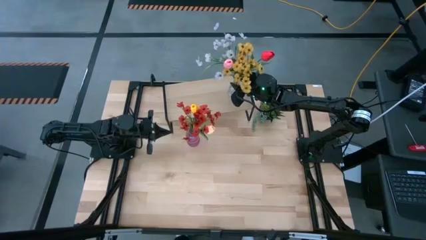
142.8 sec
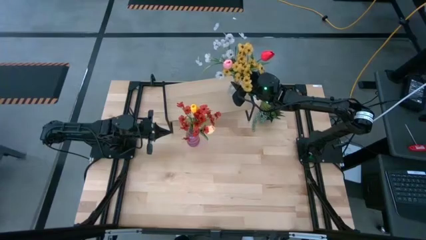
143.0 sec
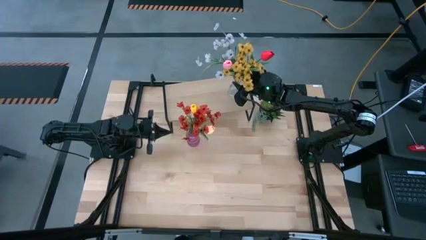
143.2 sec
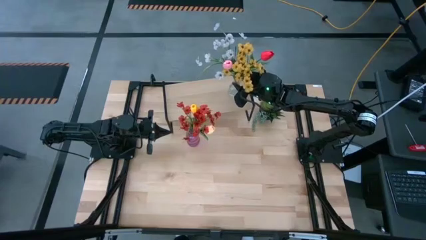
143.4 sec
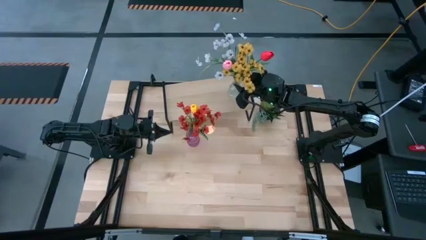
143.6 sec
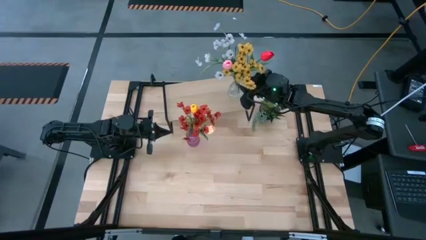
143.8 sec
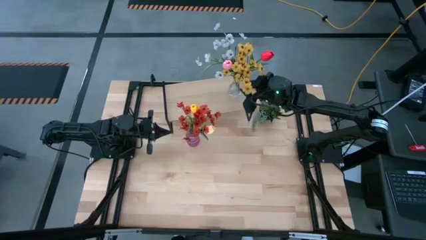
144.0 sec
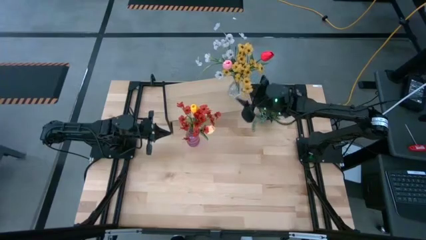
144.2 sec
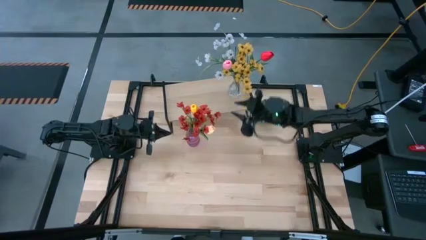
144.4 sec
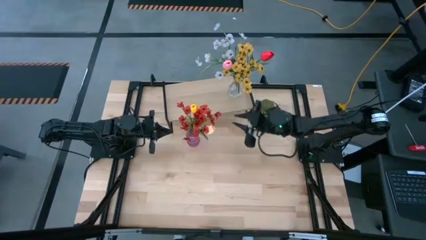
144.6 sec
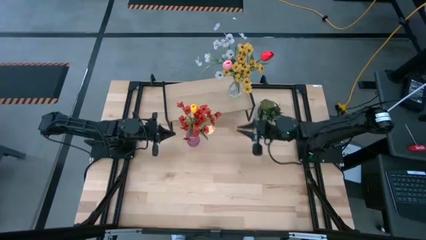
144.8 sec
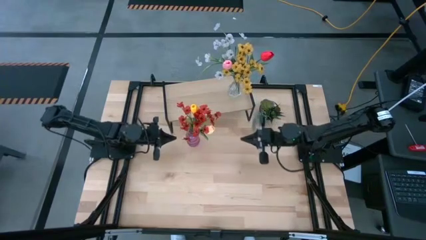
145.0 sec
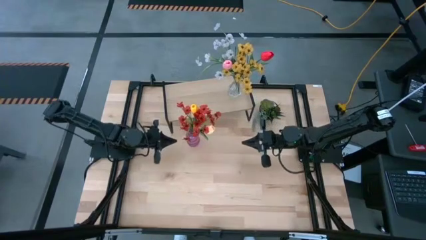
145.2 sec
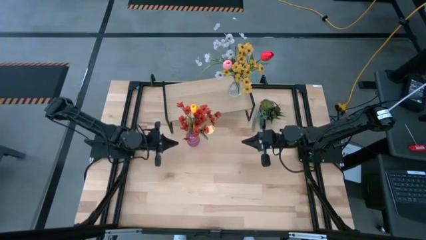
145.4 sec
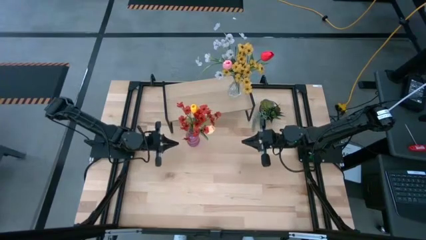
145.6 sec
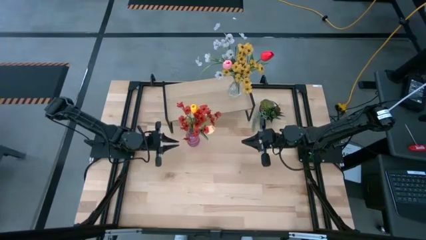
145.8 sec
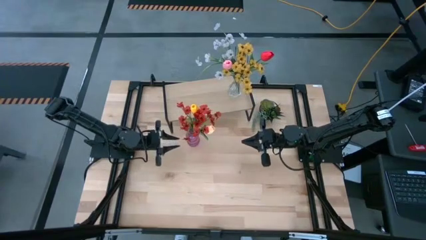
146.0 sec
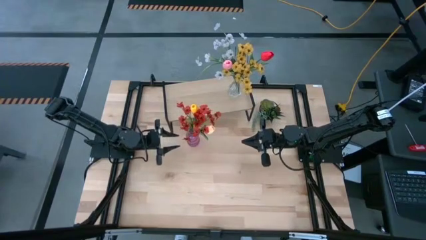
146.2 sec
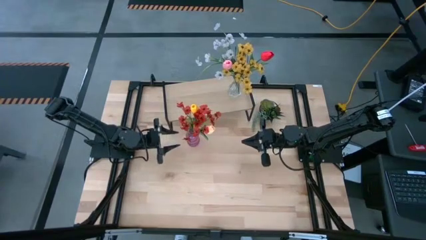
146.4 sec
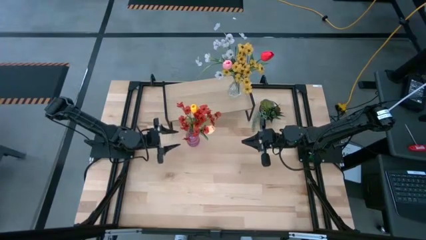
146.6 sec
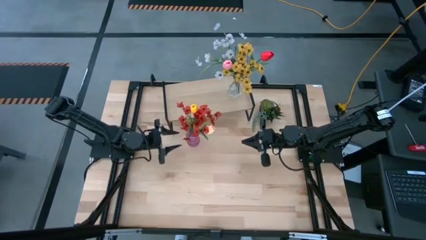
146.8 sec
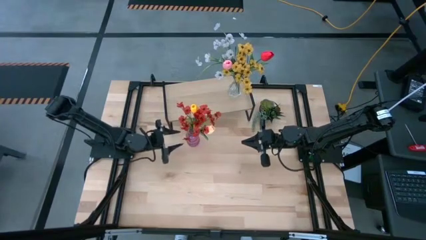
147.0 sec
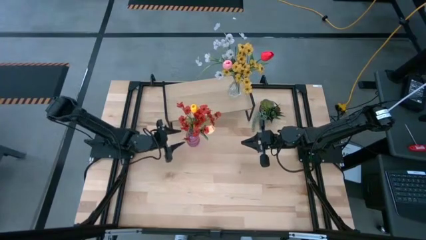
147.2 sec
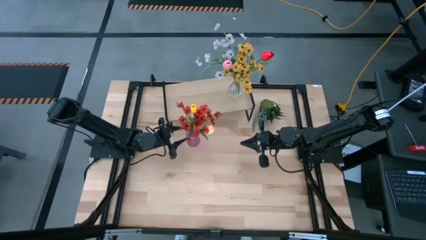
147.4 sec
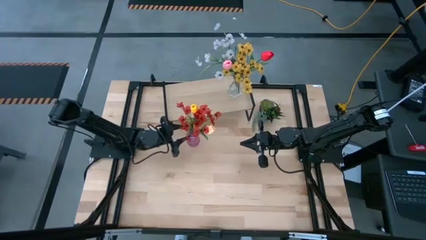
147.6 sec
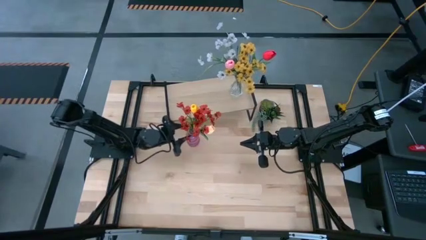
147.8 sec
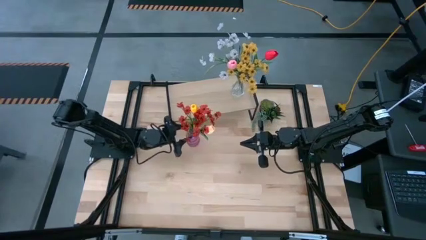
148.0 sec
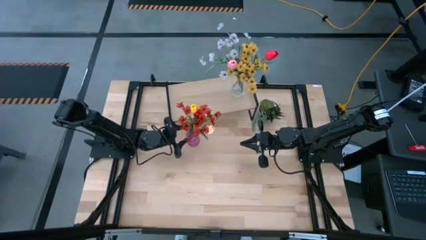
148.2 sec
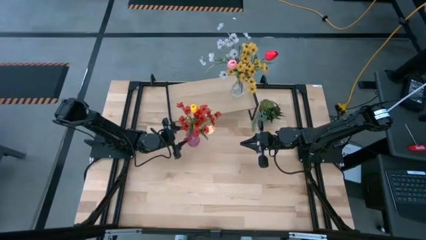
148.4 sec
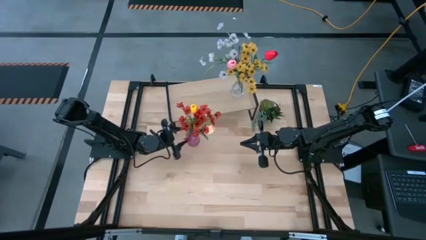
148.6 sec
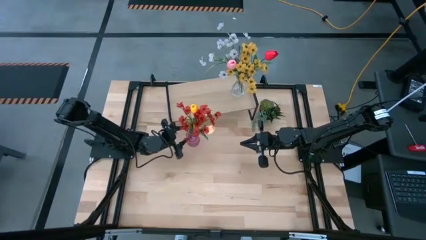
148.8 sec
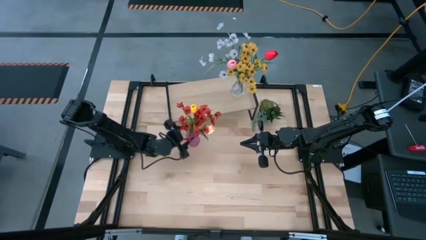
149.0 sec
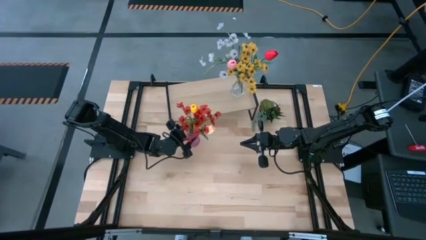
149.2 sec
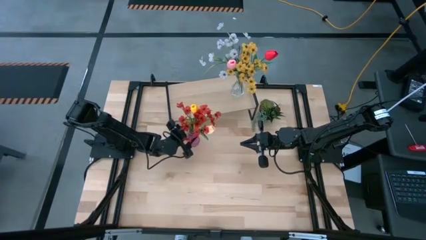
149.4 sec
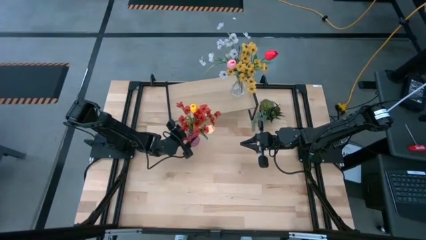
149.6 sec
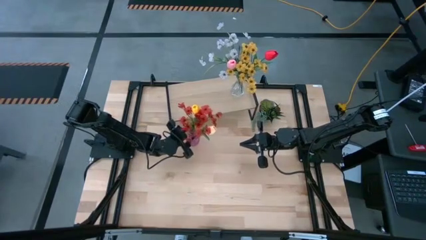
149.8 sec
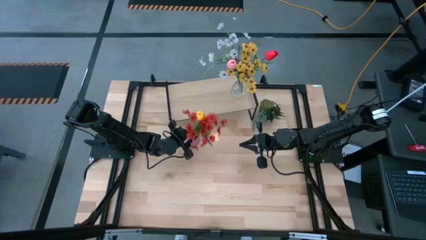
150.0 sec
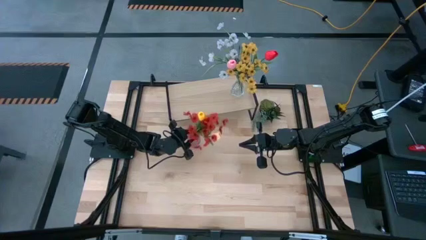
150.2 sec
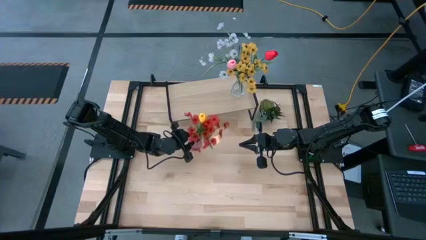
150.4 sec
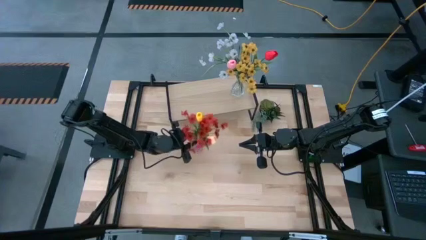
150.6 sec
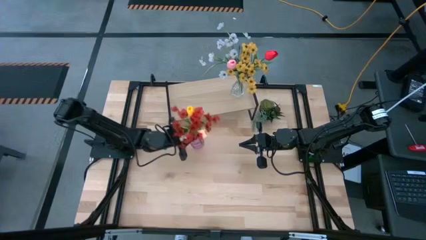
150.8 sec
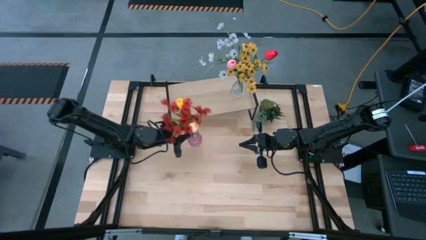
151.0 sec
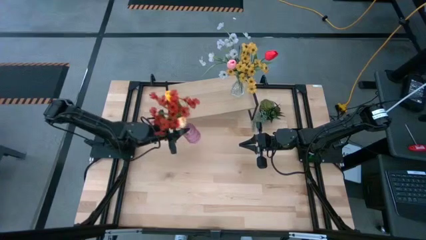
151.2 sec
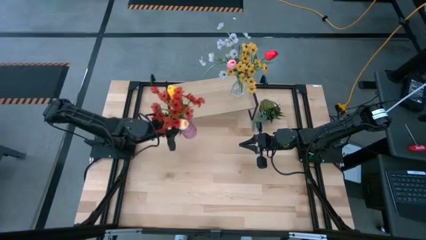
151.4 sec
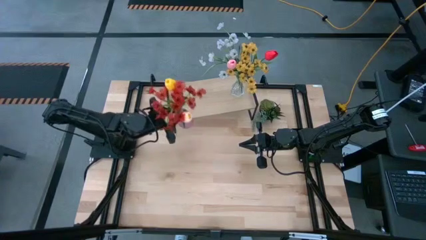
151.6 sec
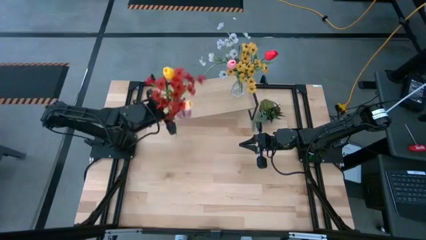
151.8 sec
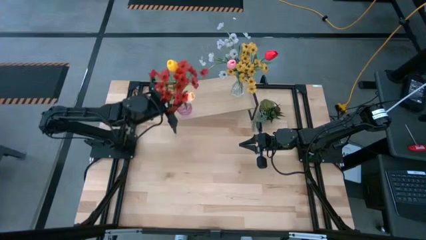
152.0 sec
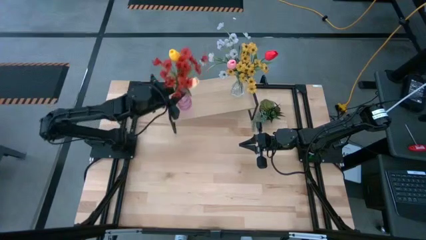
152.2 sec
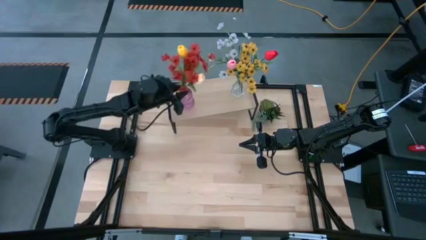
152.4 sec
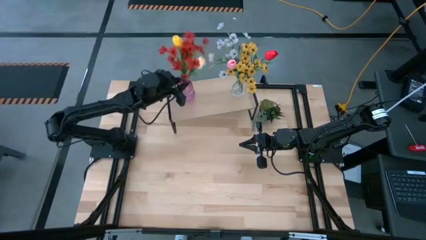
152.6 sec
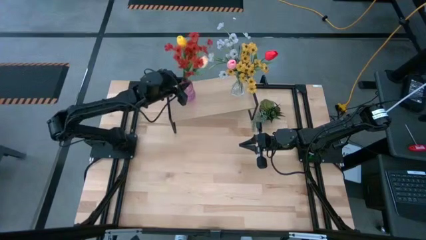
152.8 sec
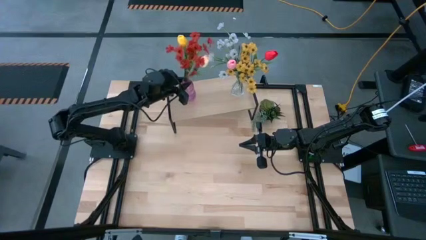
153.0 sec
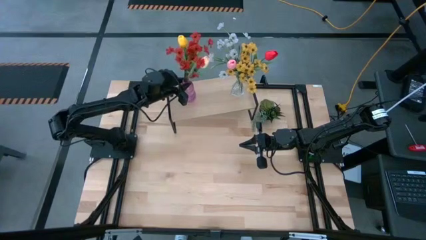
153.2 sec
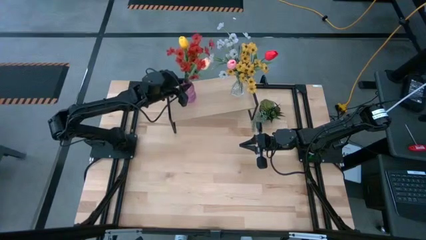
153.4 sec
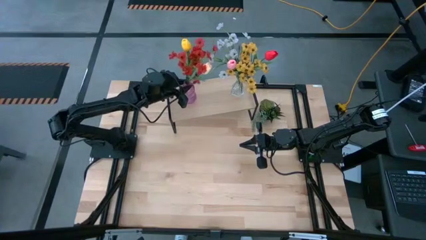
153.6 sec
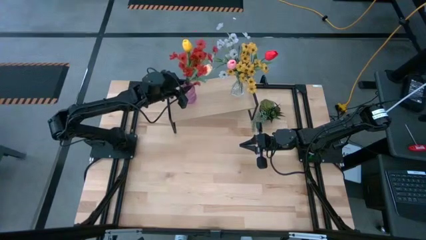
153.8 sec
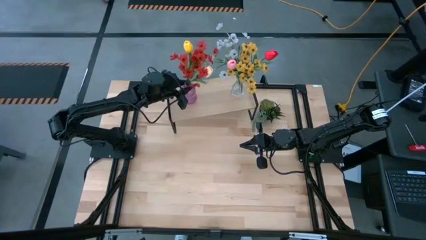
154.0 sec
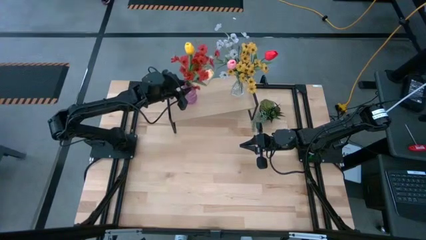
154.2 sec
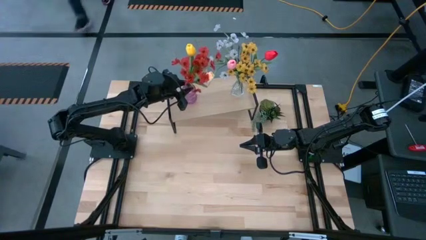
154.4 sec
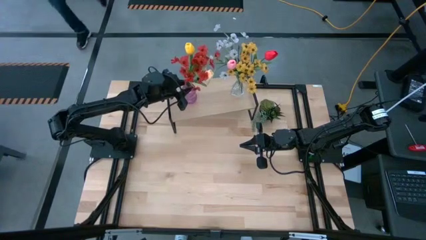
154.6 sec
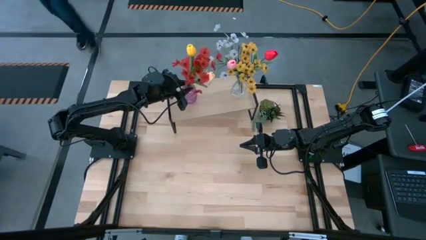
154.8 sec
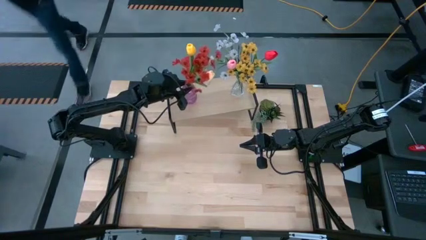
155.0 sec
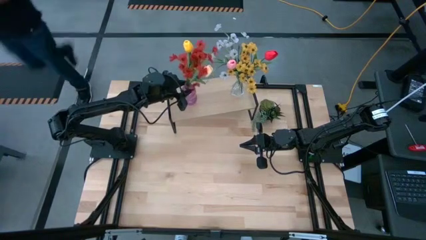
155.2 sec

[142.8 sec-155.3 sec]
Task: Pick and place flowers into a vace then onto a shelf
Put the pink flower vase on the shelf

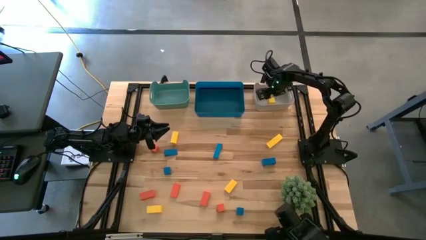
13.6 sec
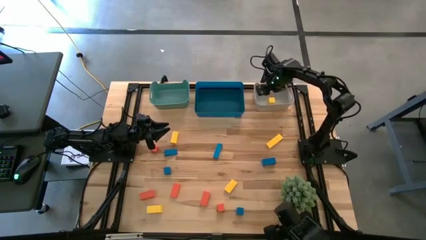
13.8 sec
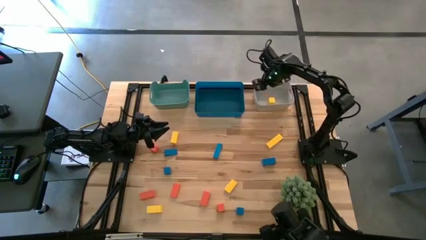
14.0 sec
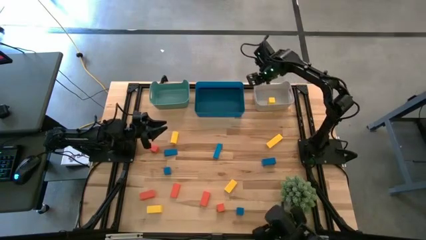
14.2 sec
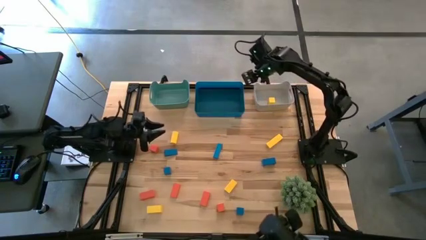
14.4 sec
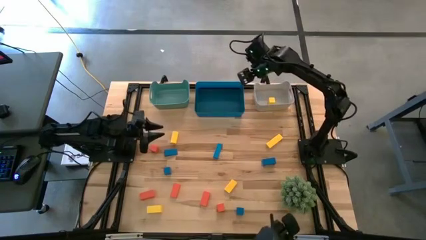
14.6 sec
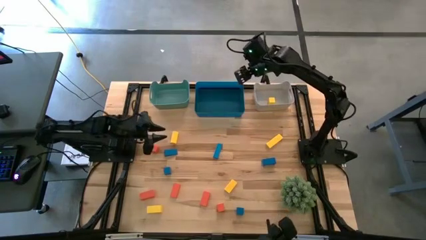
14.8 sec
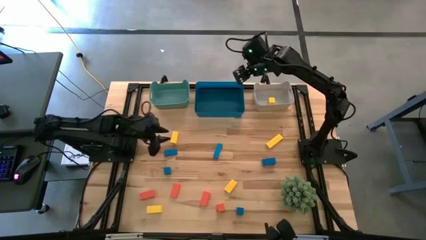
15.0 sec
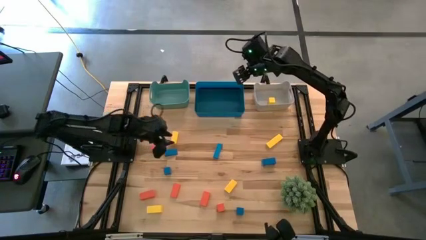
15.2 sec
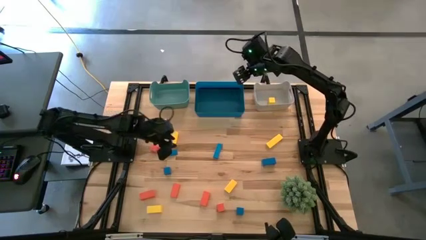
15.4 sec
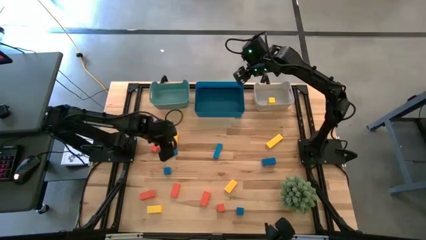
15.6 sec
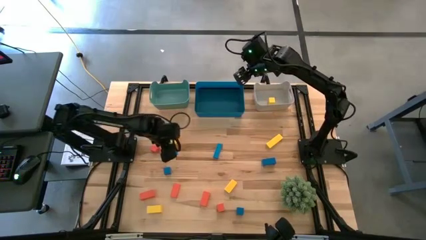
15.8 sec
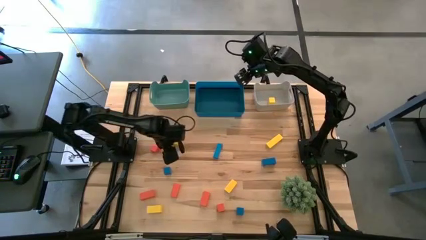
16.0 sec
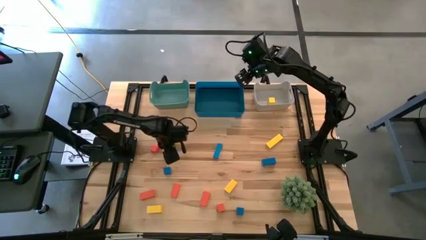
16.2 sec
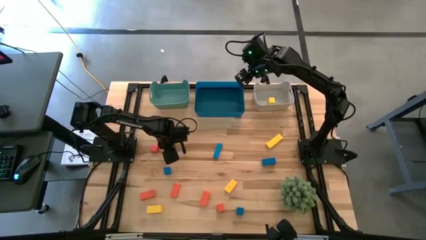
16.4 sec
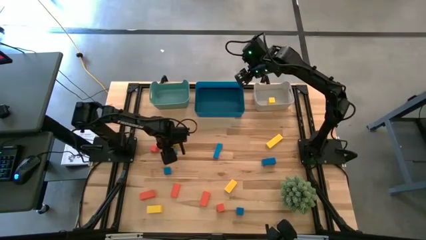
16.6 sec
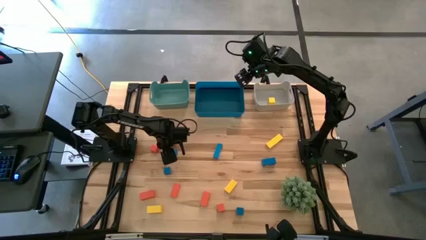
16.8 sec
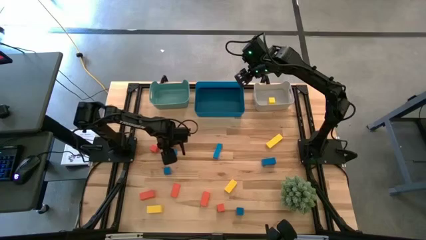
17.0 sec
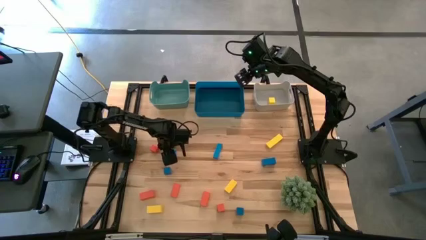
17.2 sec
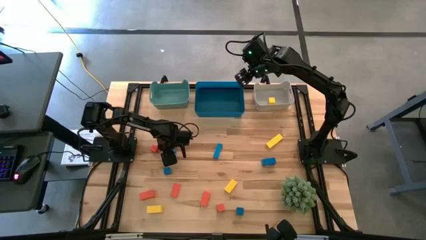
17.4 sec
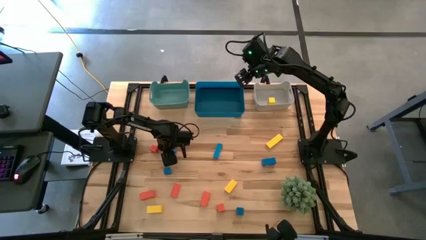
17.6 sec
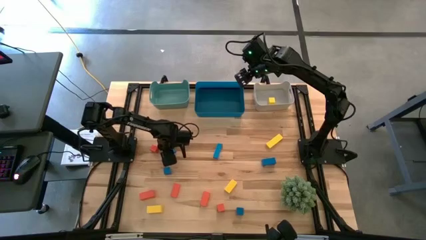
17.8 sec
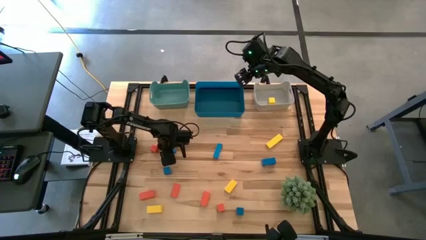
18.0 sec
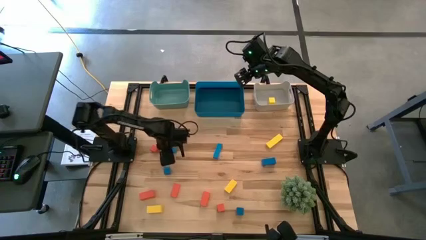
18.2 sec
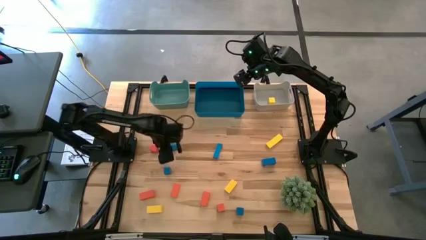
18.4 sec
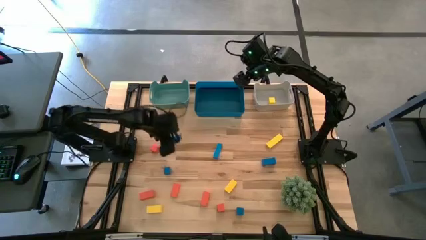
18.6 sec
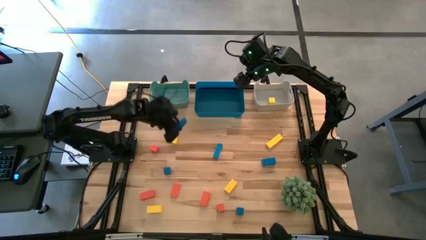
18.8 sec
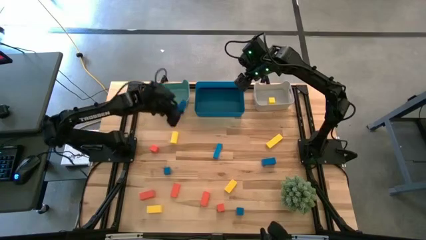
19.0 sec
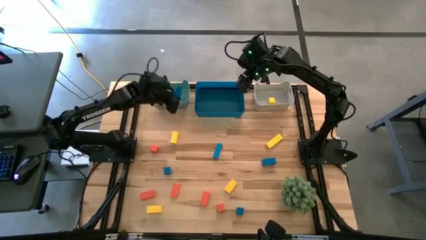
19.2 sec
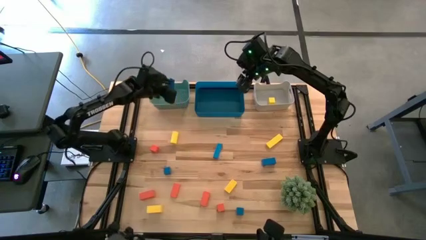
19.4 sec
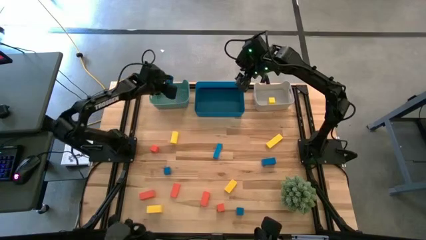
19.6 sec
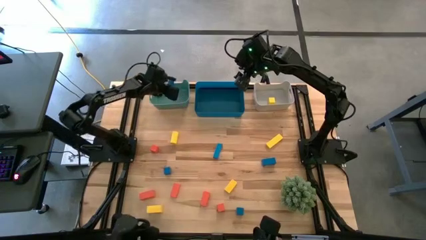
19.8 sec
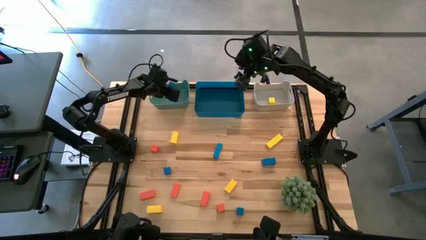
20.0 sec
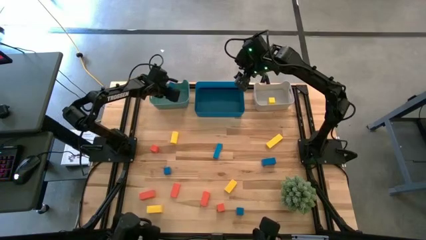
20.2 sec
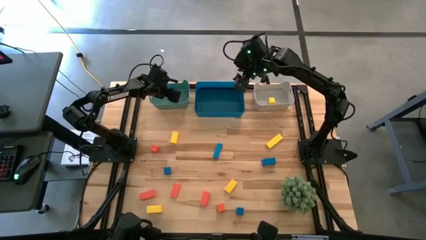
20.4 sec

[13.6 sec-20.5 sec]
Task: Sort & place blocks by color
Put the blue block into the green bin
